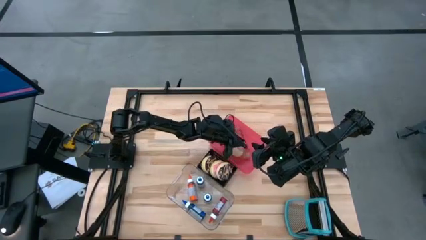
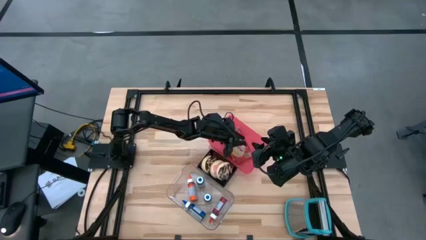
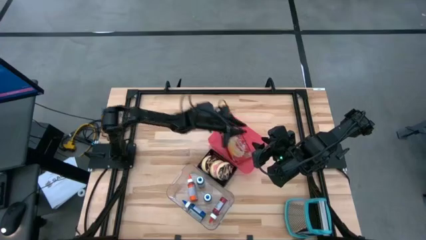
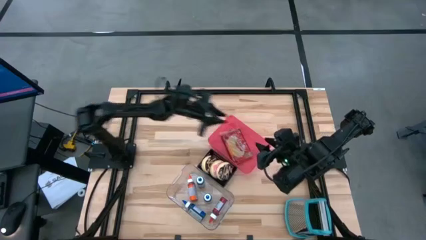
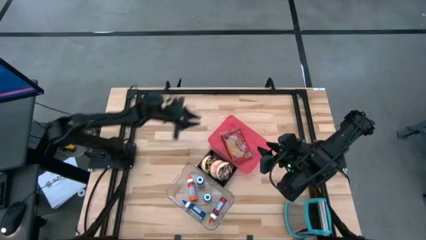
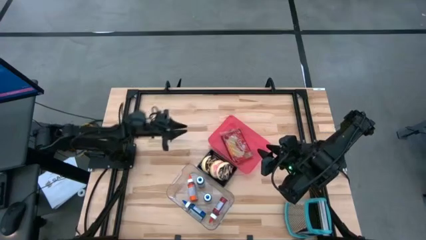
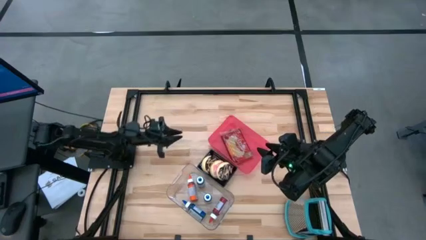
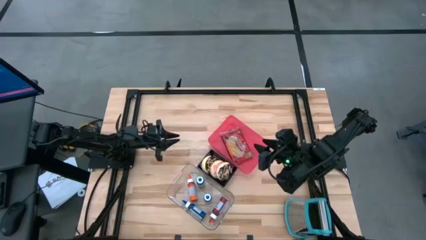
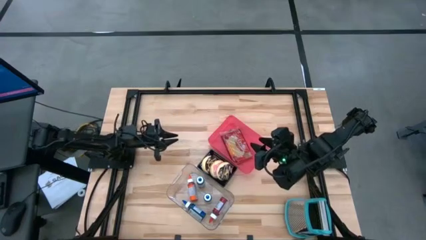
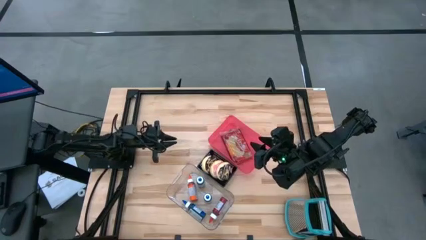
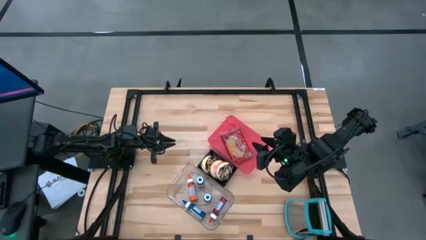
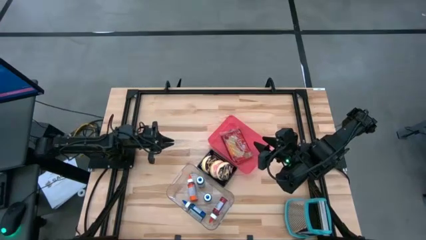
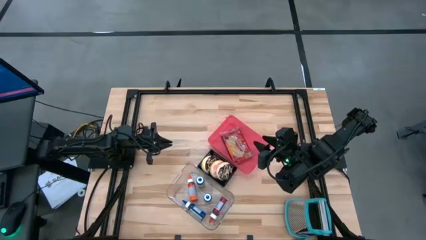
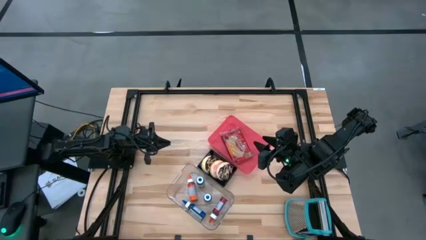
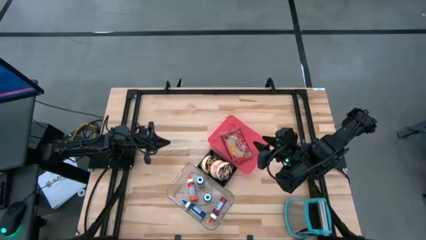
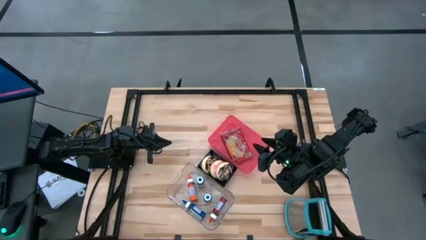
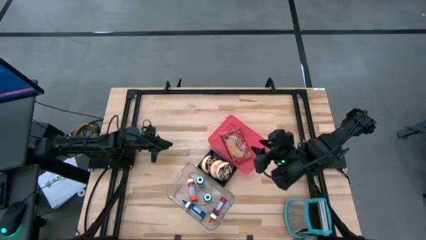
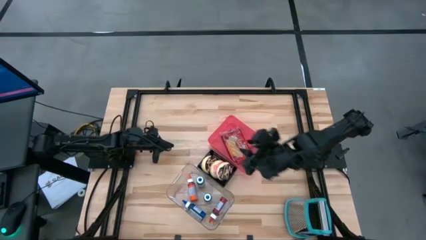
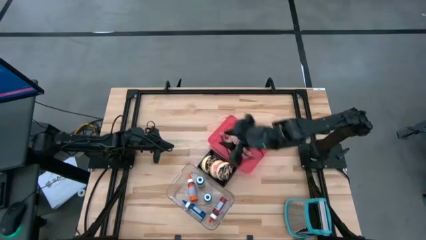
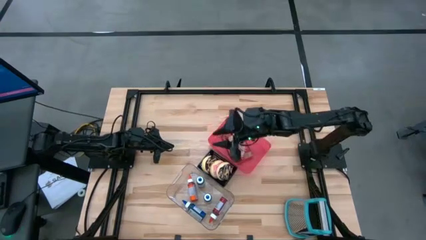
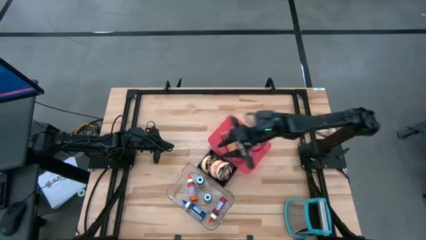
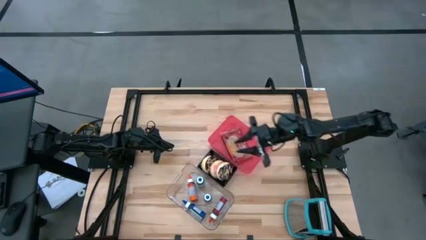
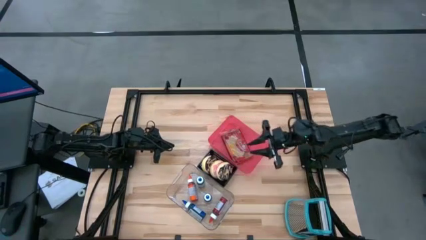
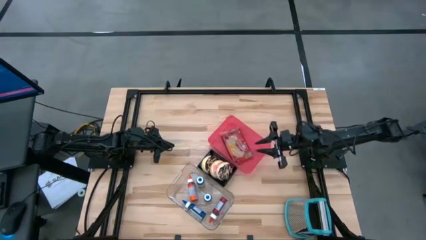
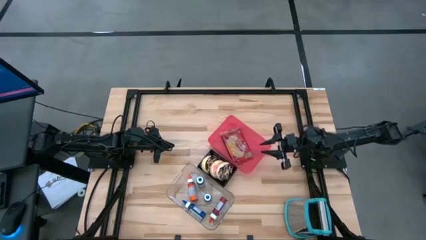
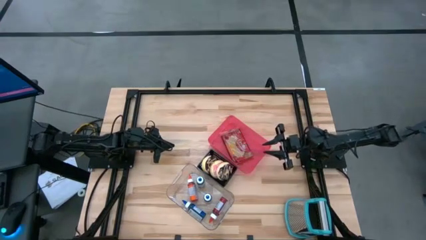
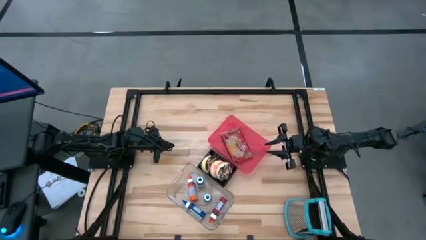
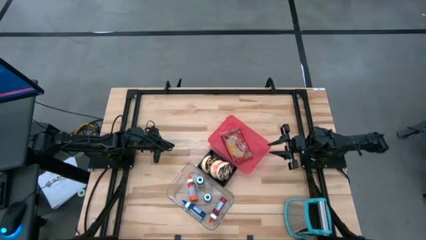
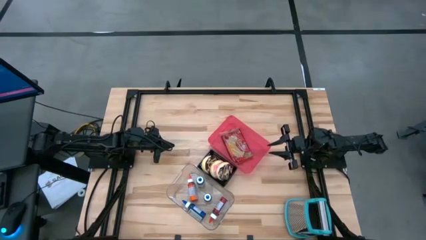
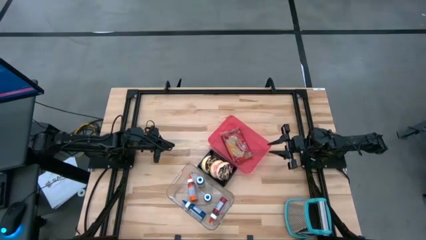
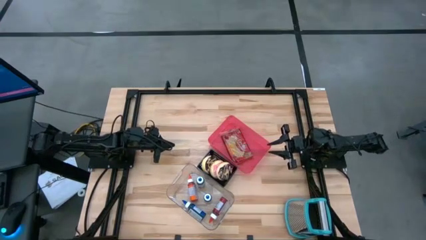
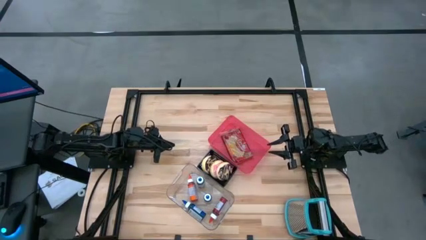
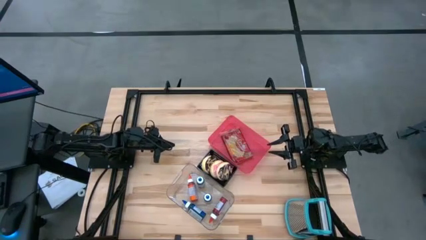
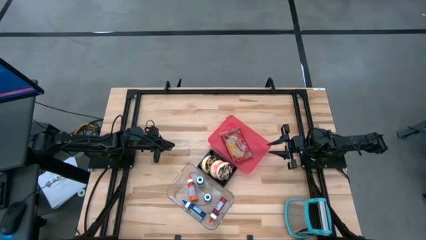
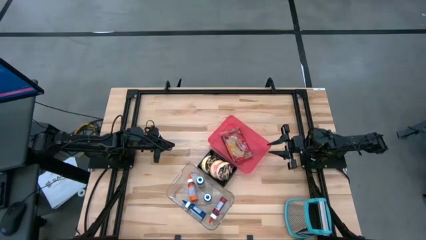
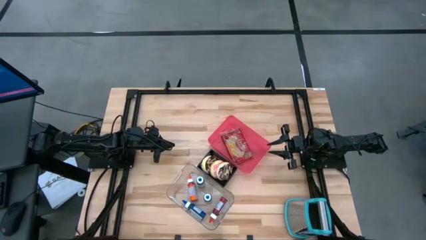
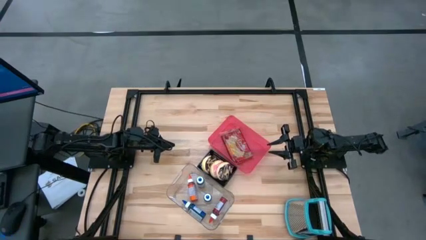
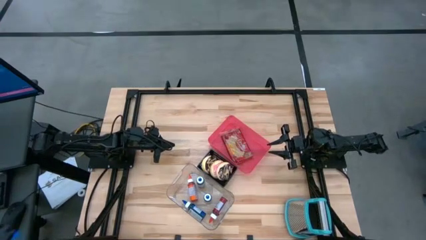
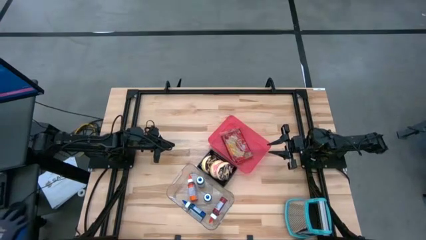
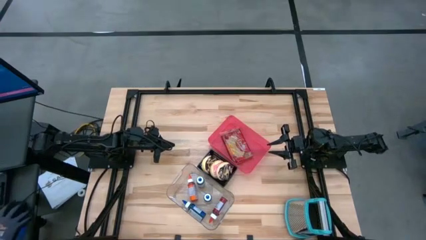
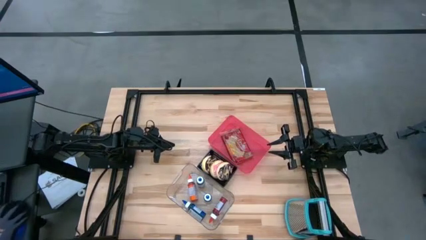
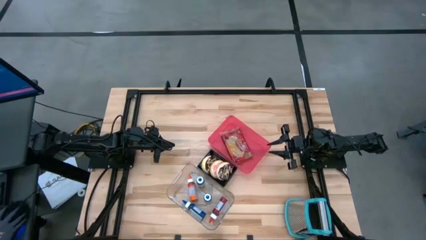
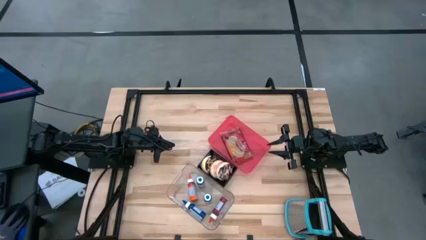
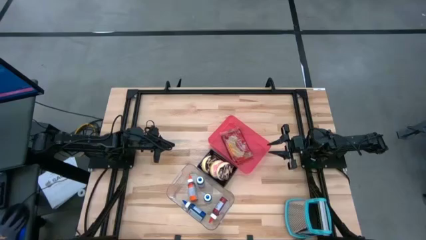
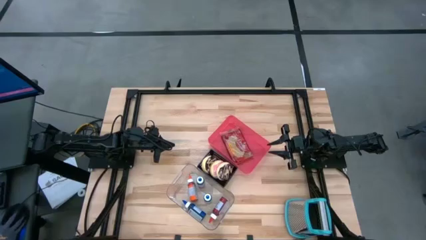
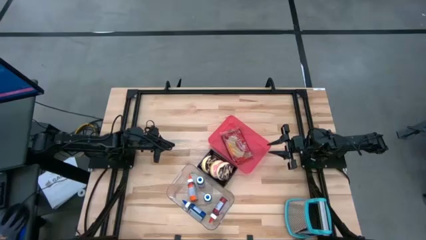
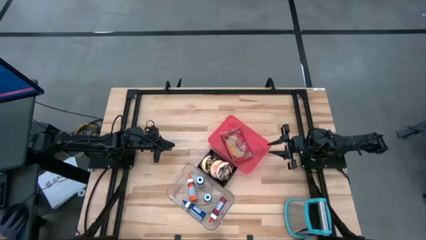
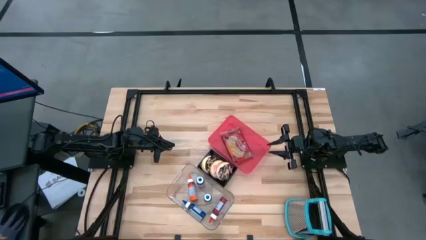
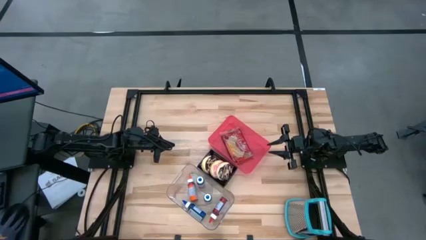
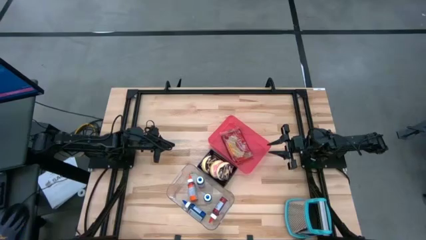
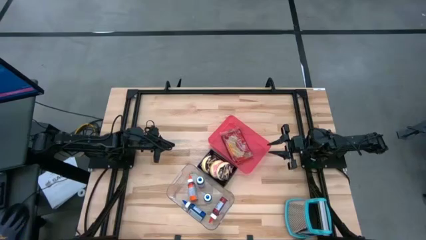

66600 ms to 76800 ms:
Return to Home Position
